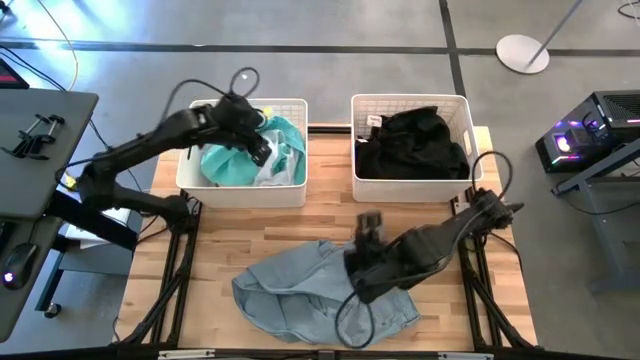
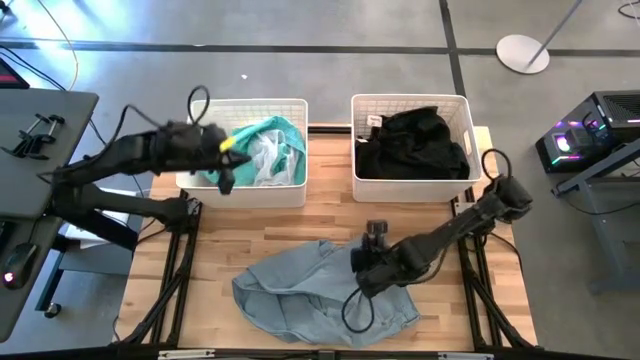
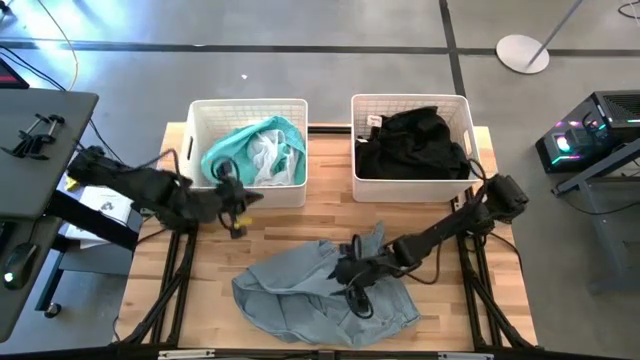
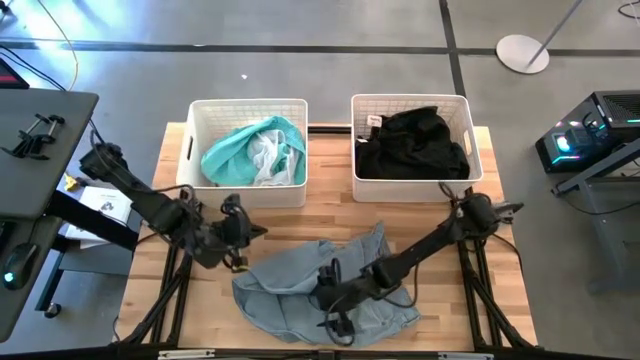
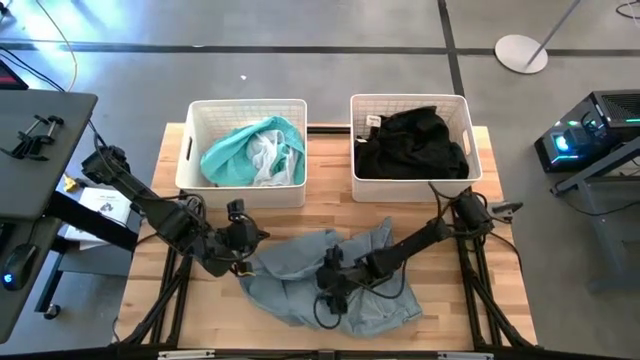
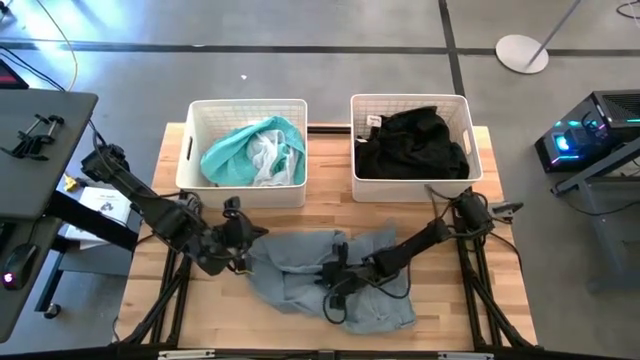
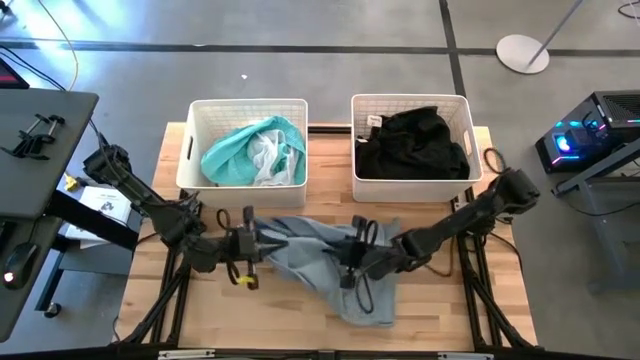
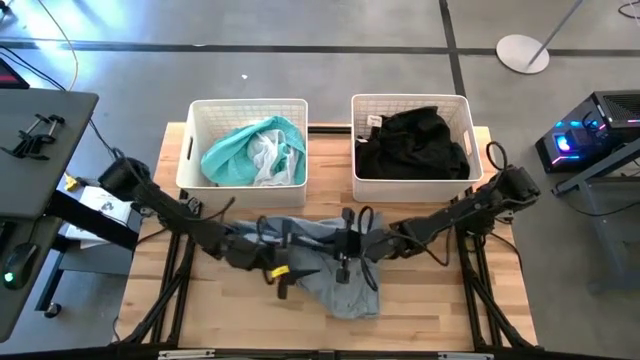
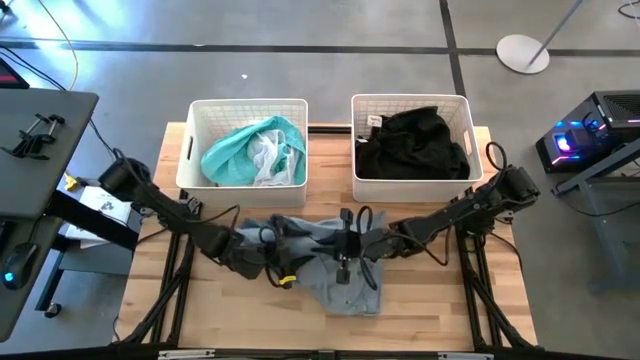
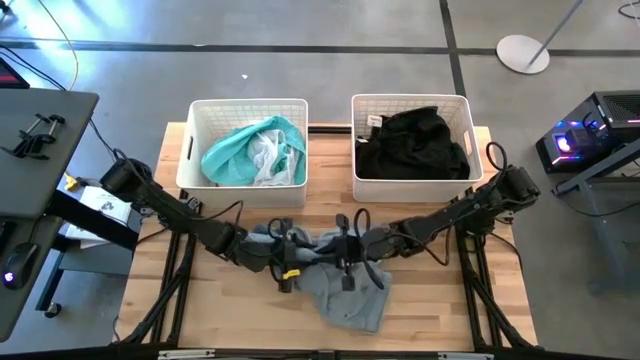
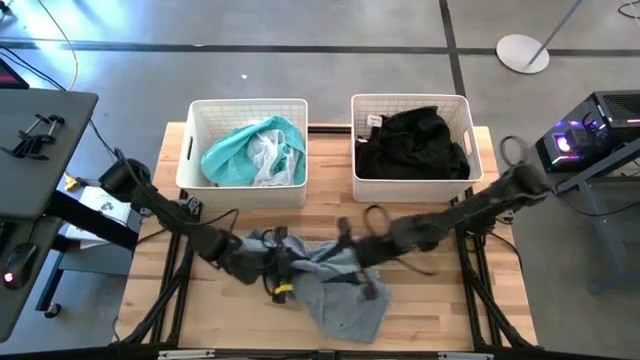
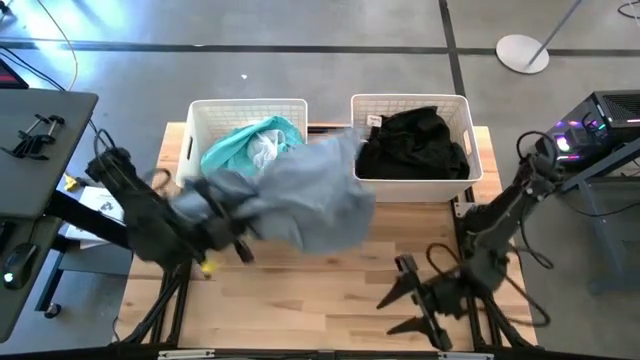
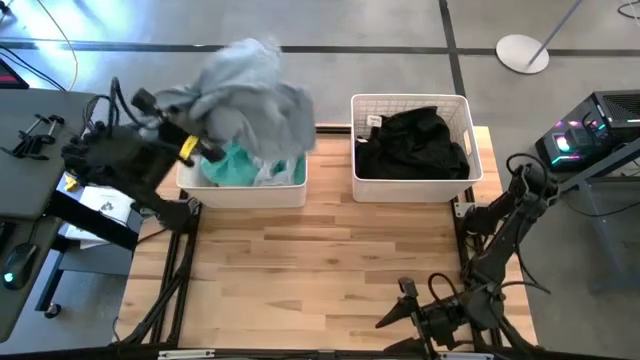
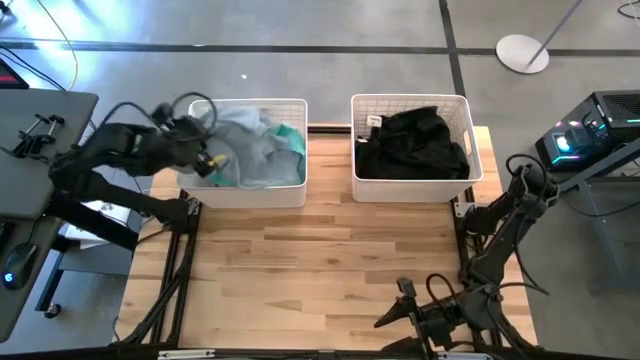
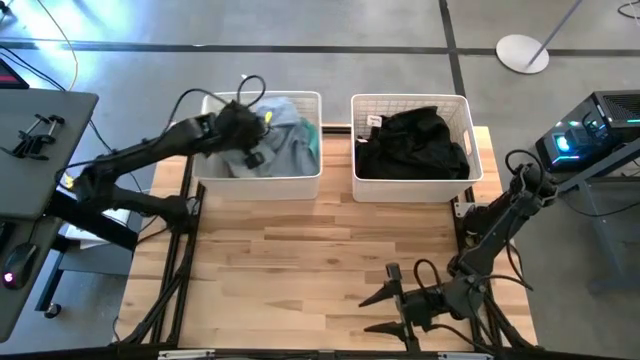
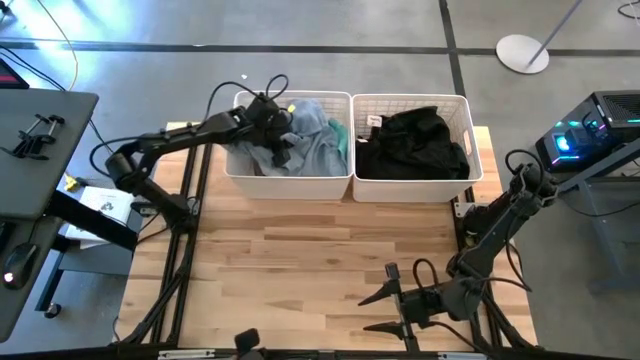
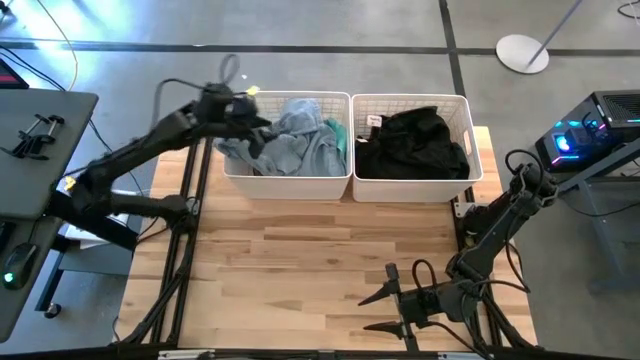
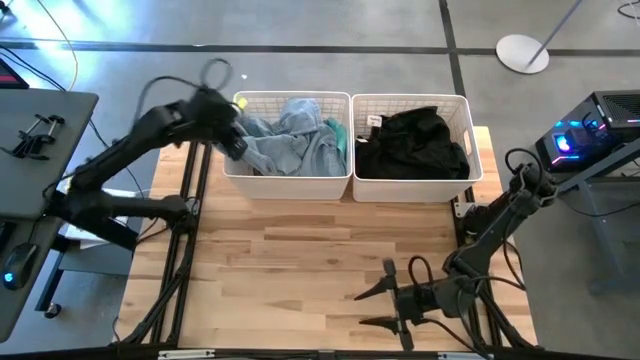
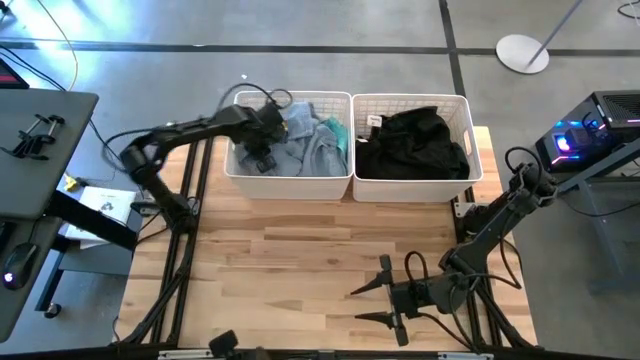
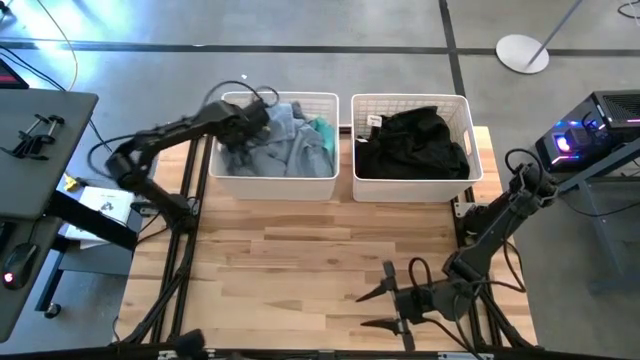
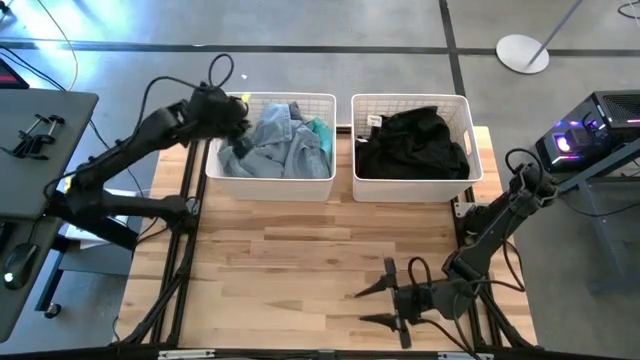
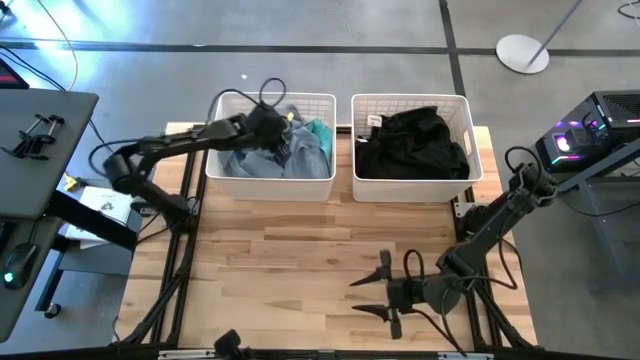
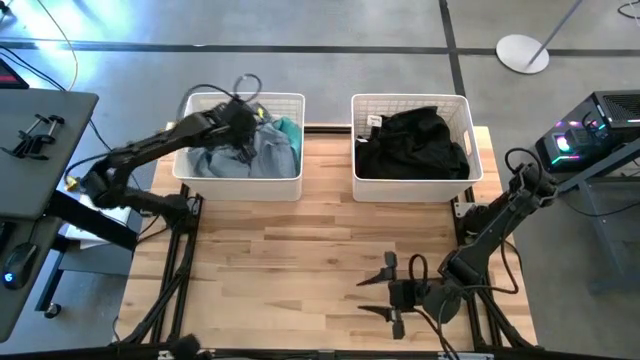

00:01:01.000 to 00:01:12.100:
Task: Sort clothes
Put the light blue pants into the left white laundry bin

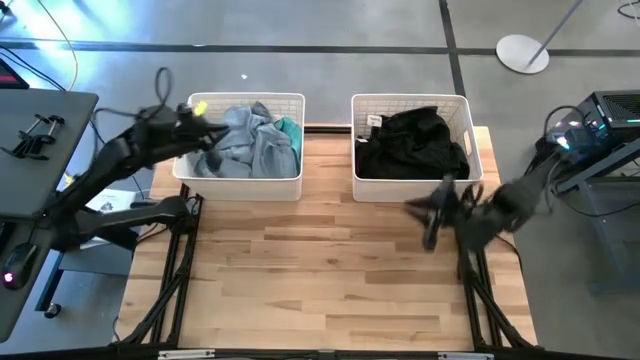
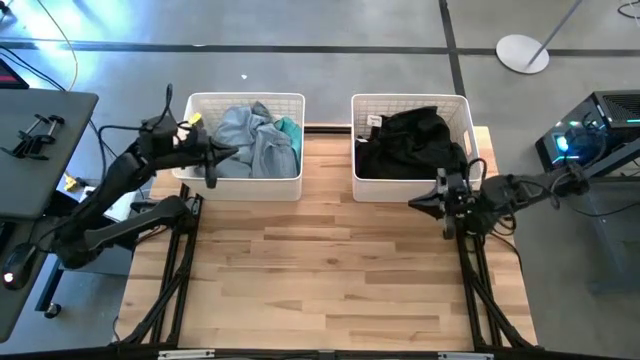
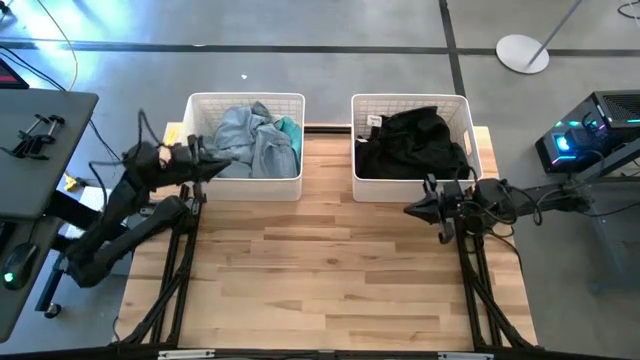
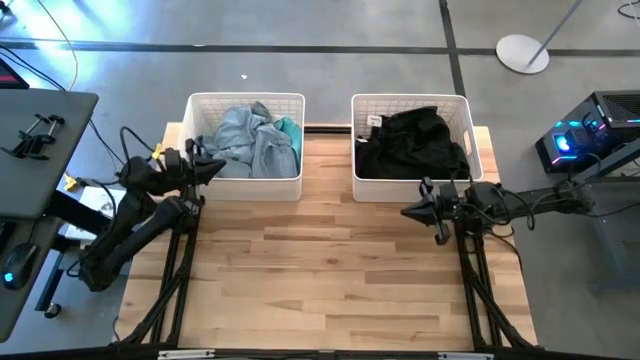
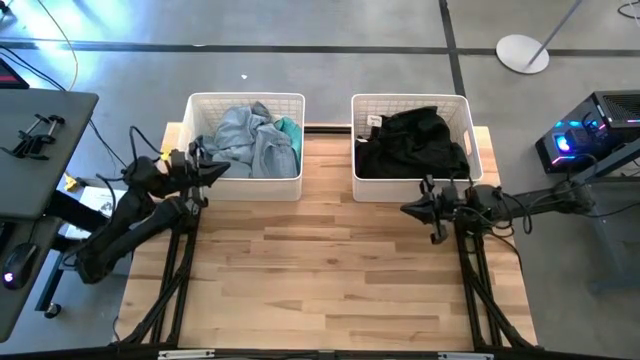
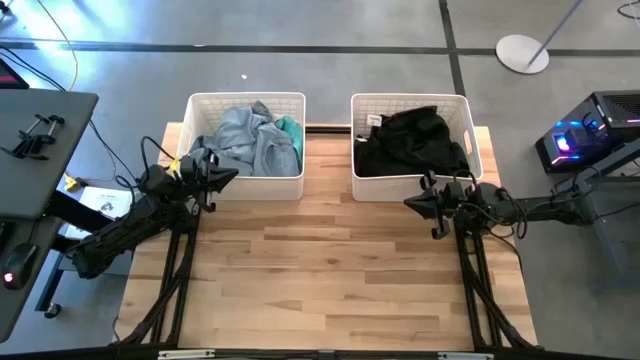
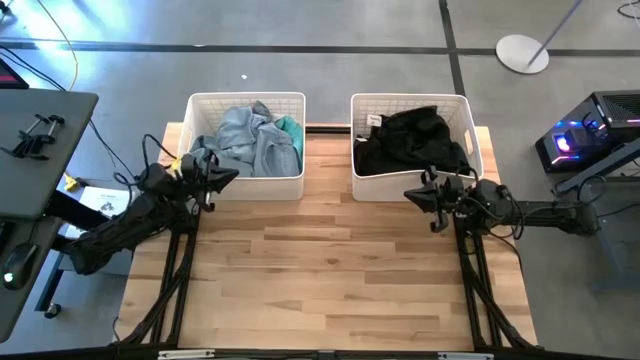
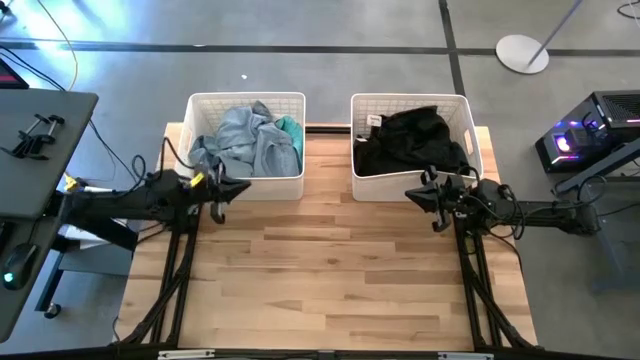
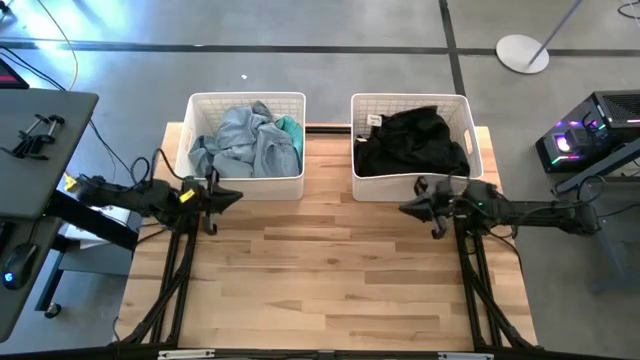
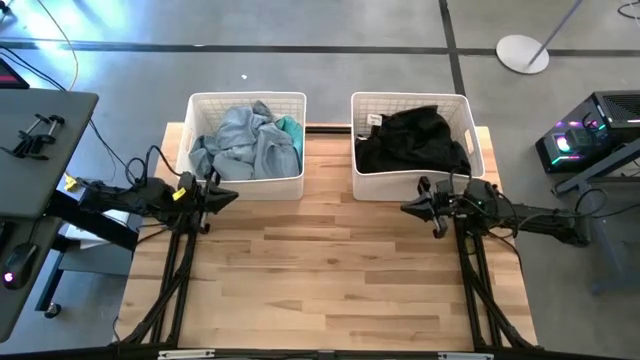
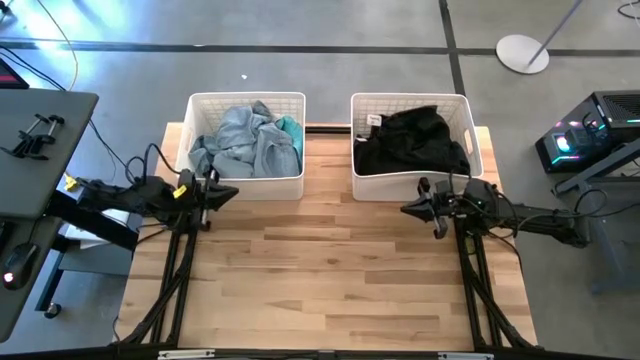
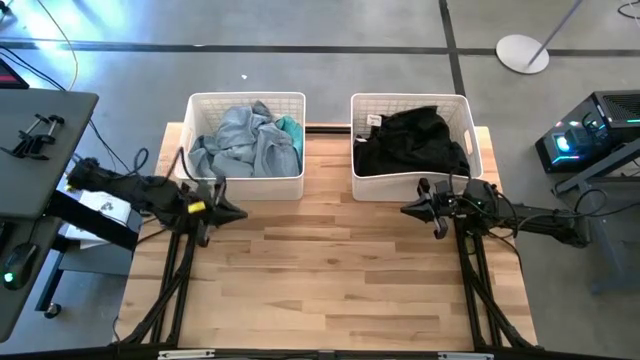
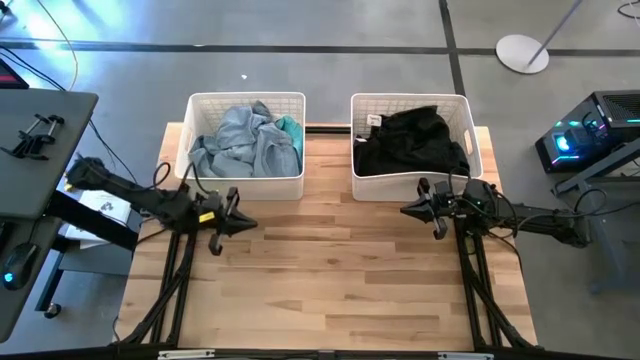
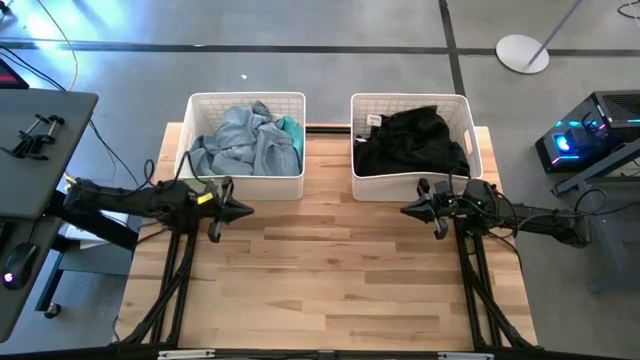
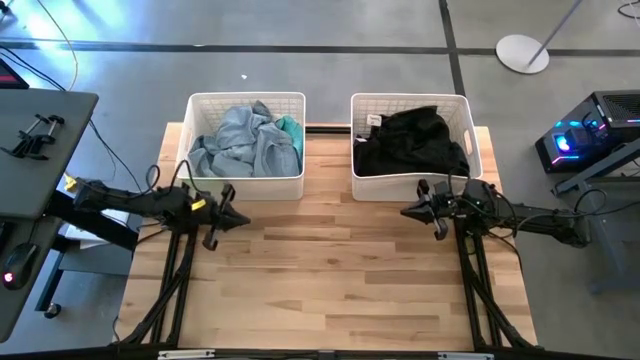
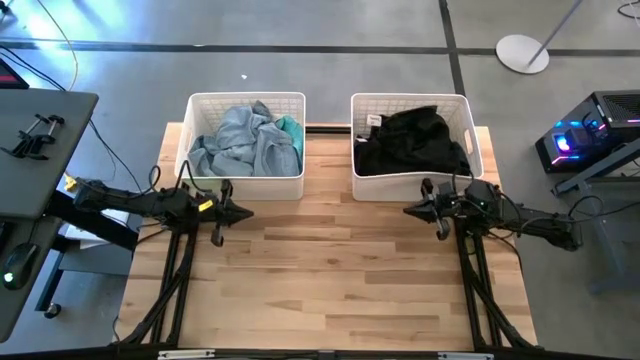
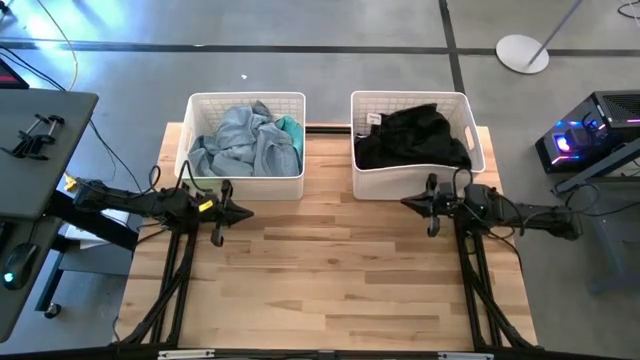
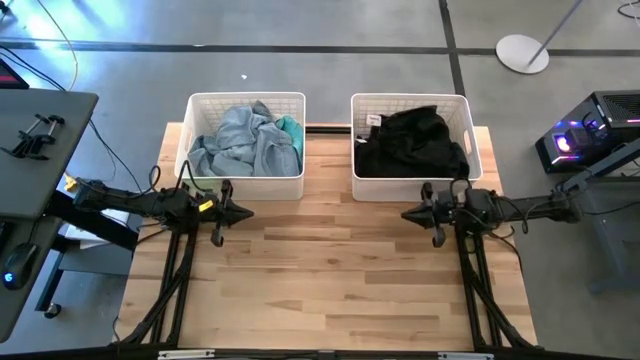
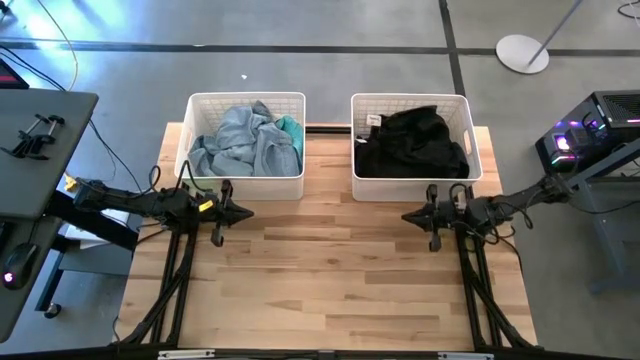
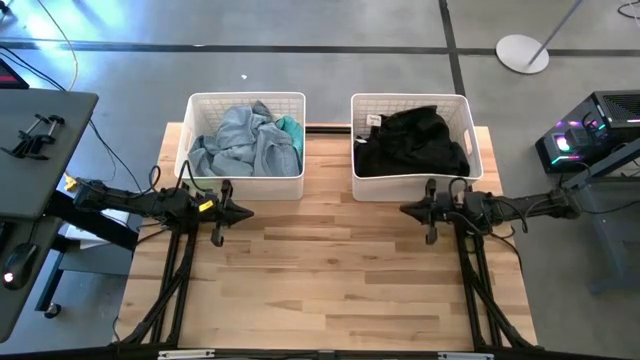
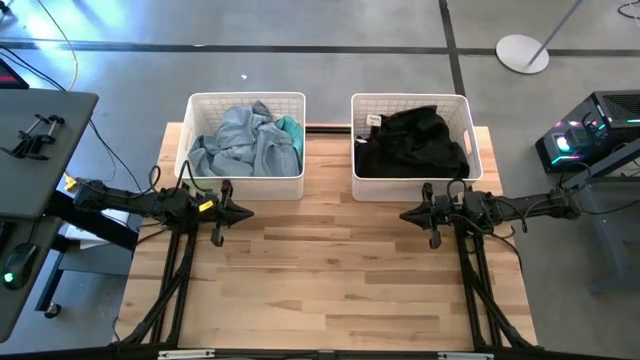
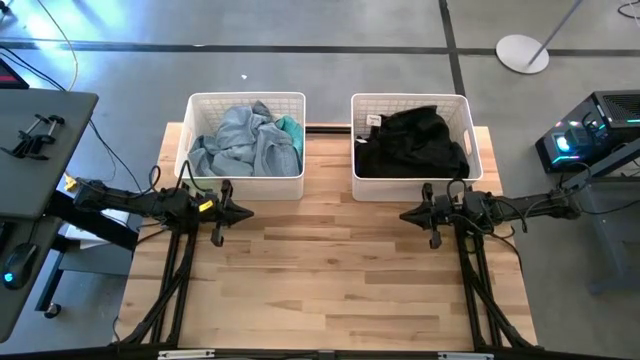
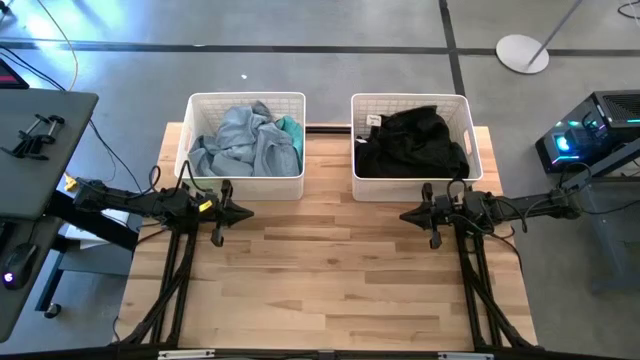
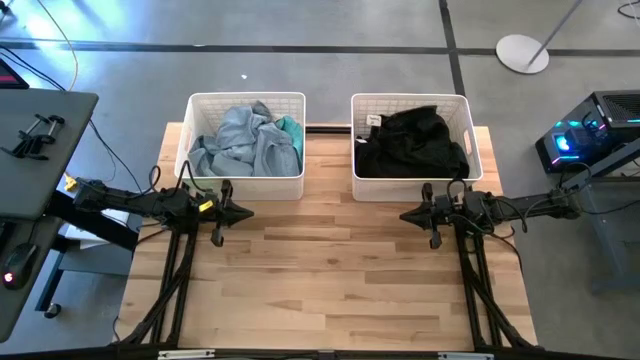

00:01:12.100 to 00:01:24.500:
Return to Home Position
